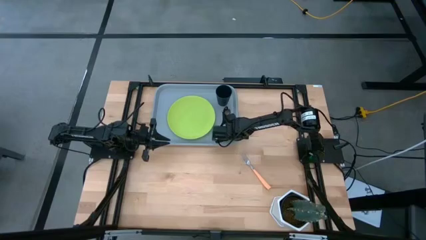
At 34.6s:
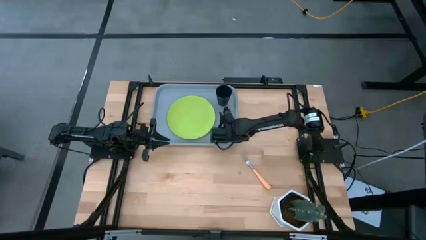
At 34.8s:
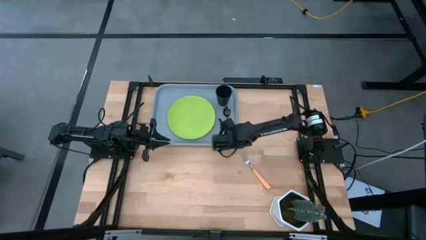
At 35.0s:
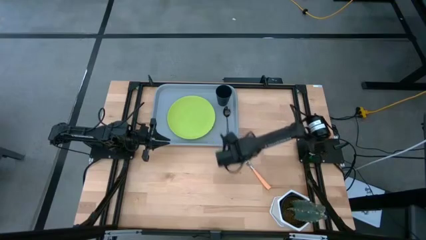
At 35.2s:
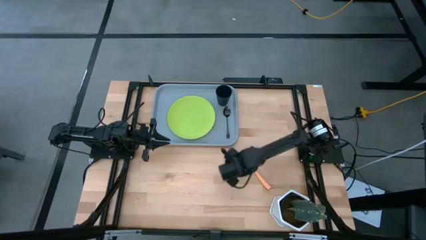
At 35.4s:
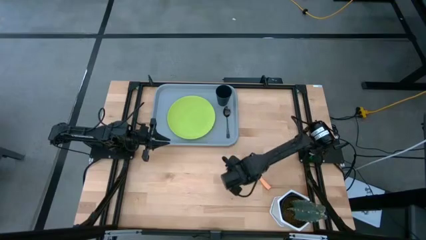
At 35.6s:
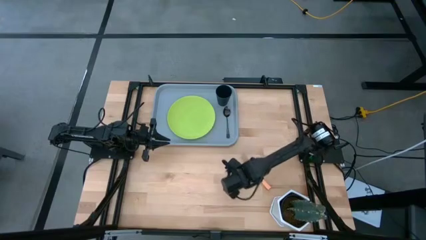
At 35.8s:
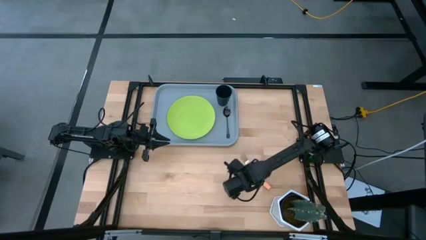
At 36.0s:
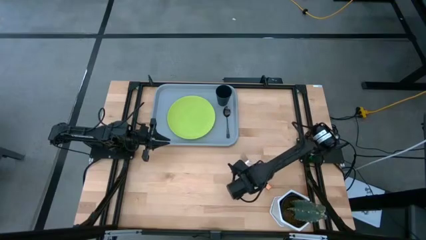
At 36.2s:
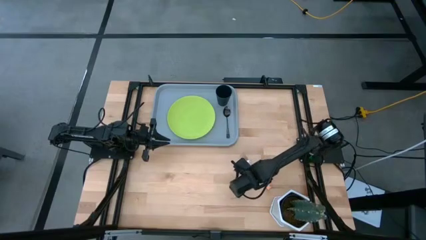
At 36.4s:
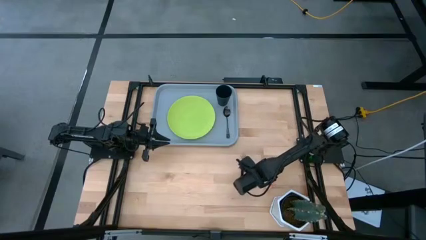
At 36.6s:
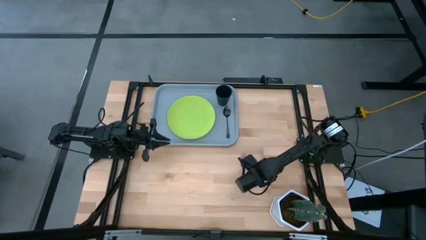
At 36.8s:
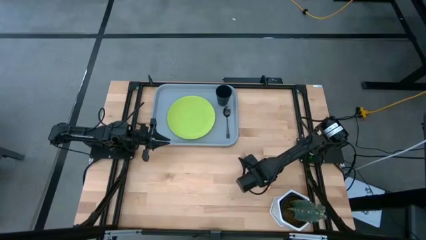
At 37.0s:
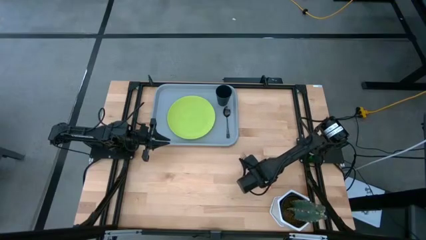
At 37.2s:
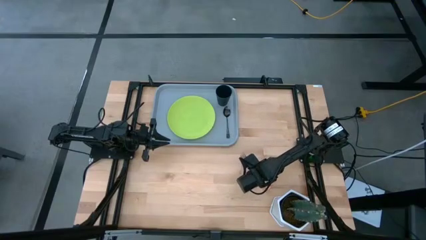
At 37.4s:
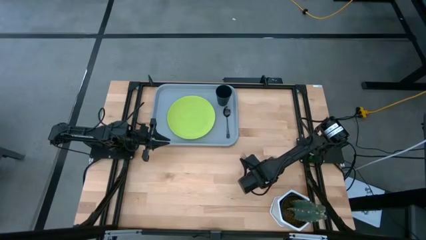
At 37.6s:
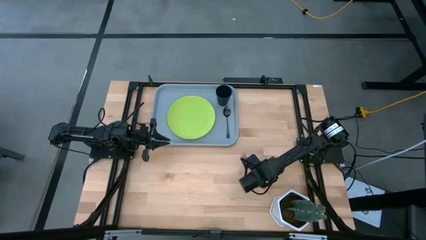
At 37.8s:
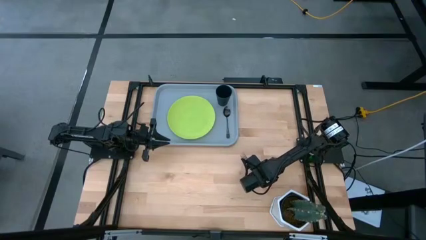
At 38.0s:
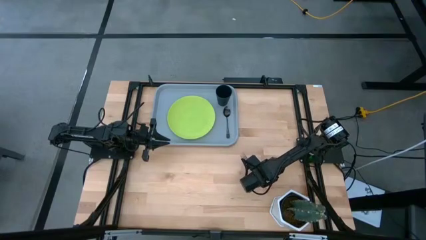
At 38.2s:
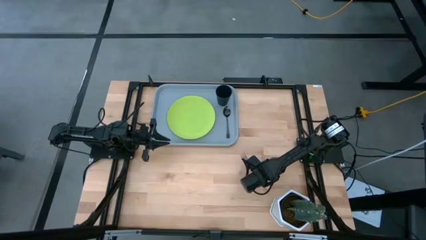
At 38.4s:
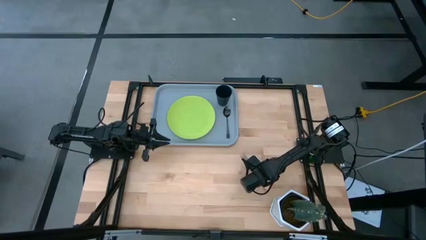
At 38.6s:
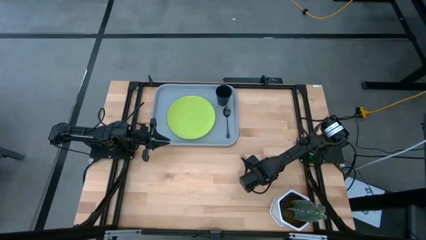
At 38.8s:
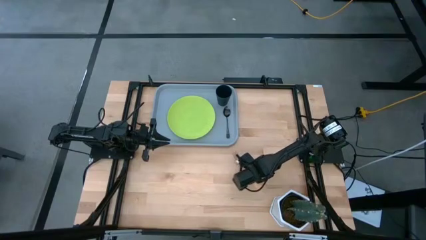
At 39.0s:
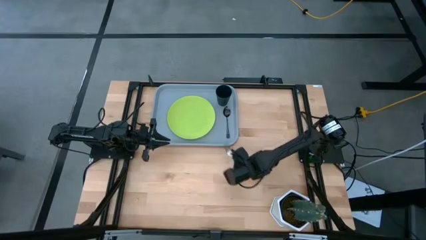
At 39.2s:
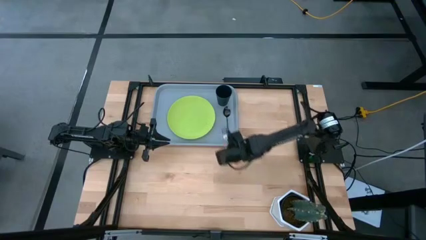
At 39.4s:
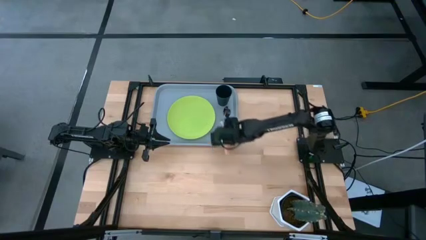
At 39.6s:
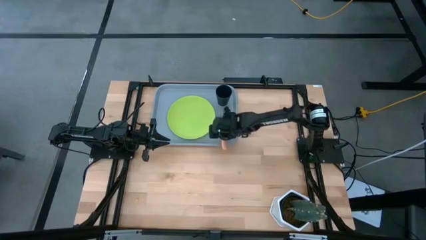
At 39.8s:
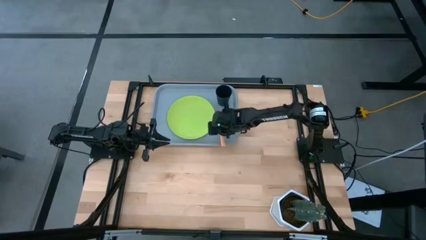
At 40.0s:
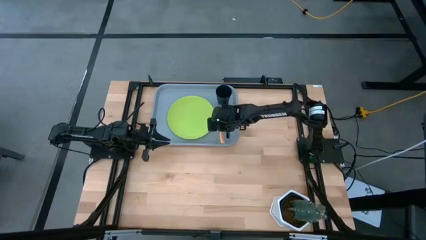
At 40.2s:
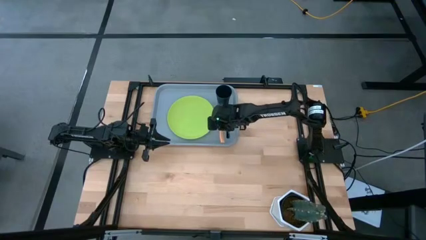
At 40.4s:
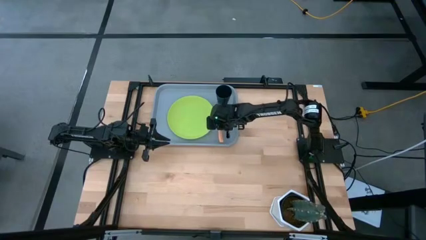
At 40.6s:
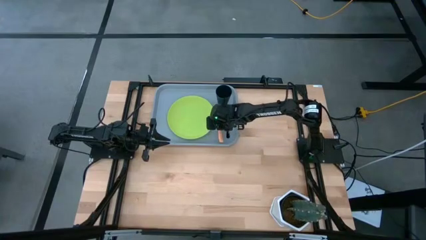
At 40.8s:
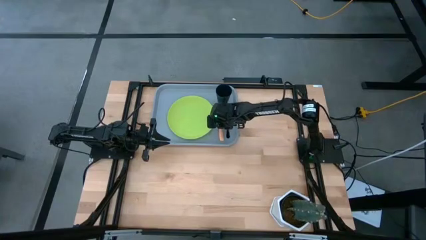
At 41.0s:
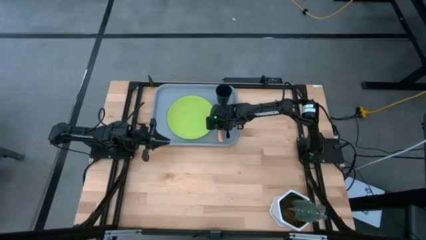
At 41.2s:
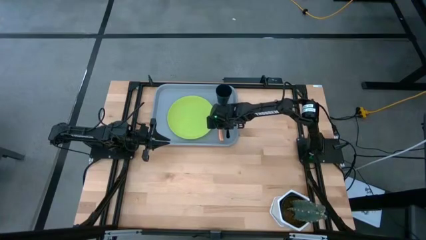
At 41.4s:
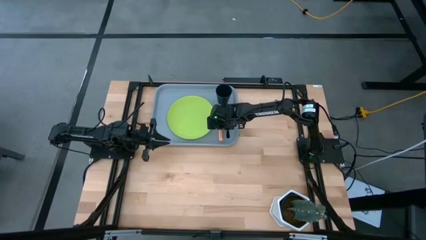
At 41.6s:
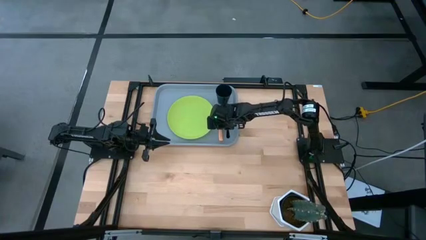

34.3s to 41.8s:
Task: Pick and place plate/cup/fork/spoon on tray
Put the orange fork on the gray tray to the left of the black spoon

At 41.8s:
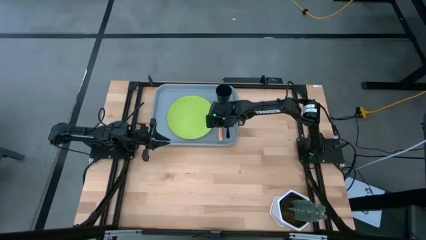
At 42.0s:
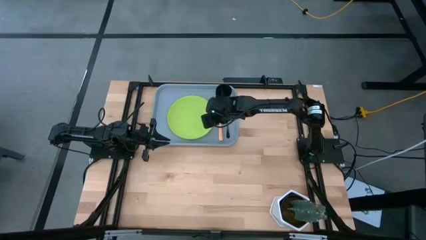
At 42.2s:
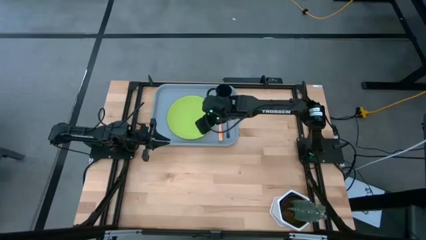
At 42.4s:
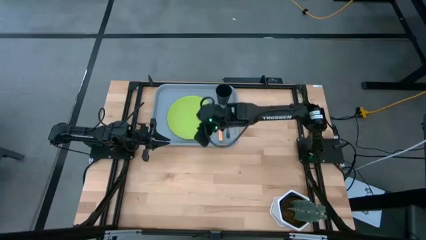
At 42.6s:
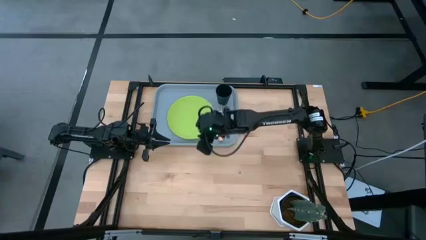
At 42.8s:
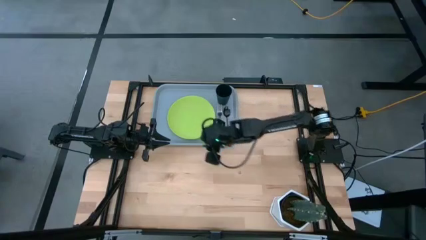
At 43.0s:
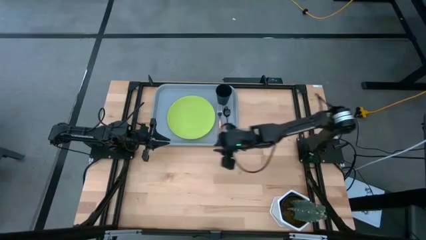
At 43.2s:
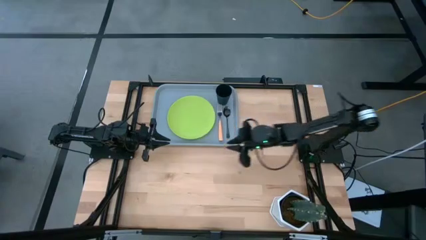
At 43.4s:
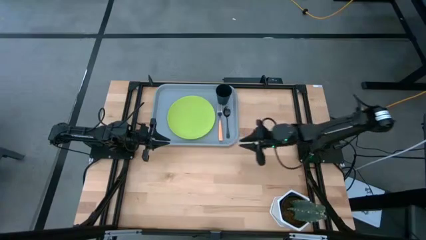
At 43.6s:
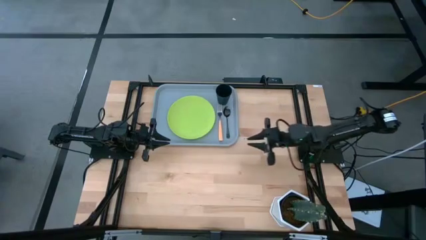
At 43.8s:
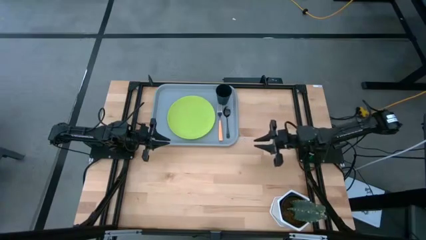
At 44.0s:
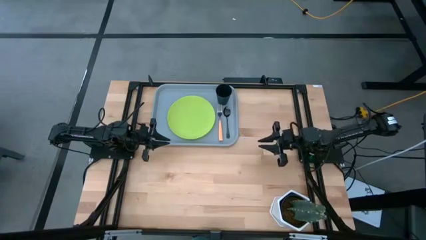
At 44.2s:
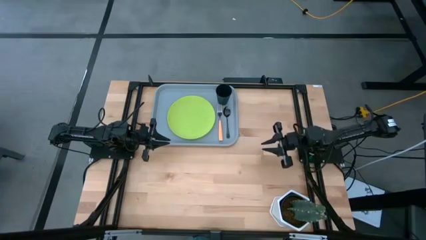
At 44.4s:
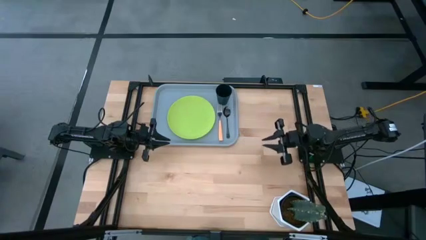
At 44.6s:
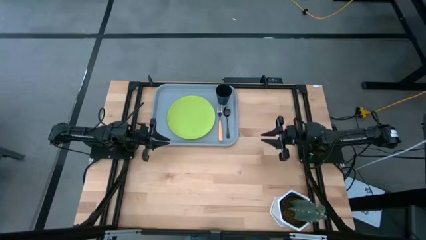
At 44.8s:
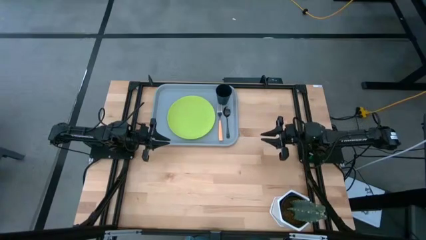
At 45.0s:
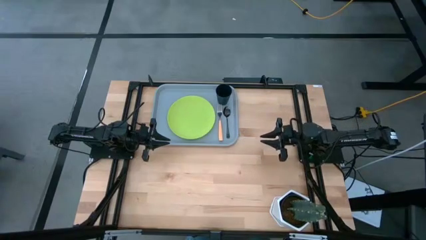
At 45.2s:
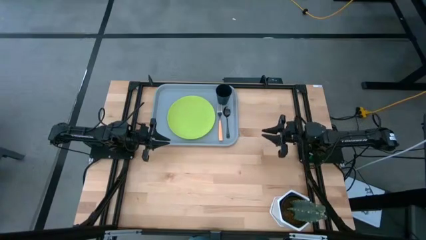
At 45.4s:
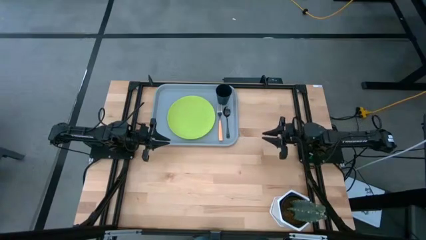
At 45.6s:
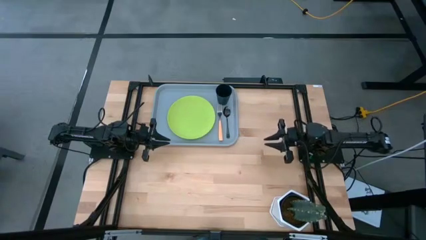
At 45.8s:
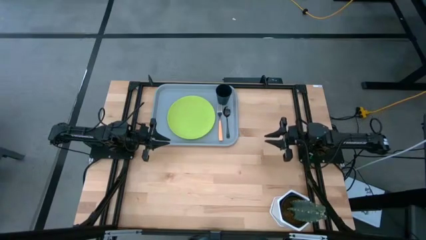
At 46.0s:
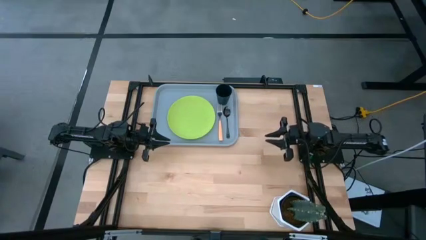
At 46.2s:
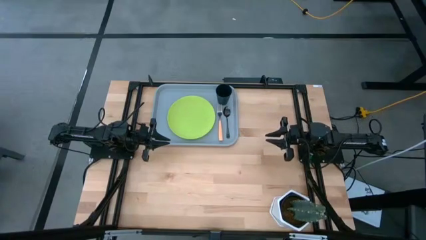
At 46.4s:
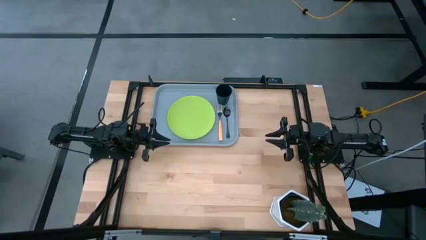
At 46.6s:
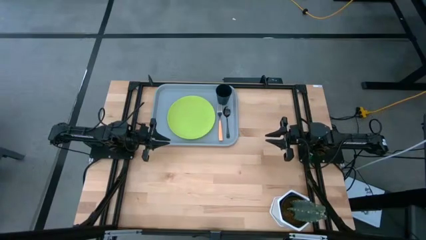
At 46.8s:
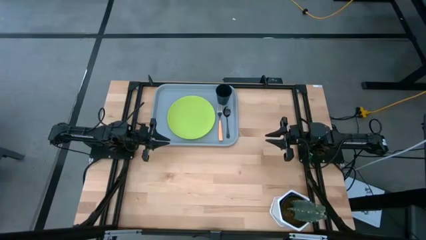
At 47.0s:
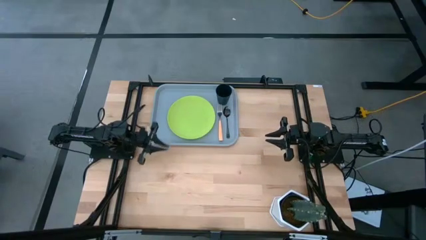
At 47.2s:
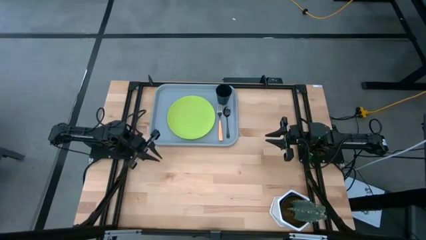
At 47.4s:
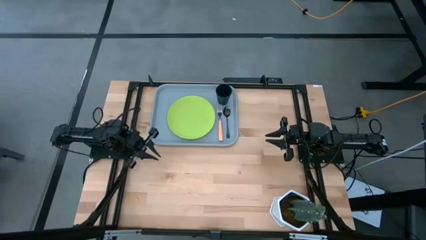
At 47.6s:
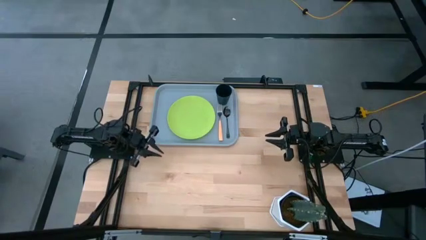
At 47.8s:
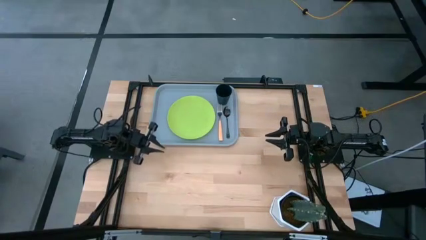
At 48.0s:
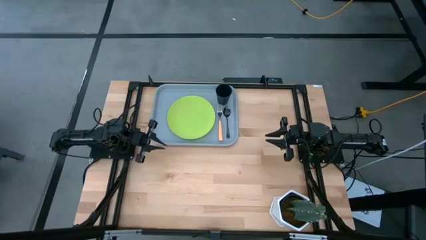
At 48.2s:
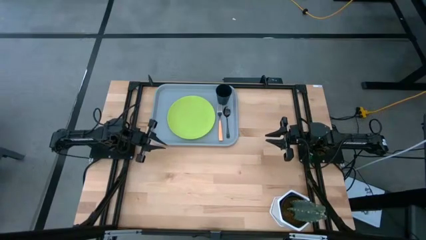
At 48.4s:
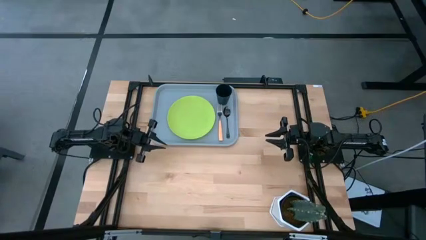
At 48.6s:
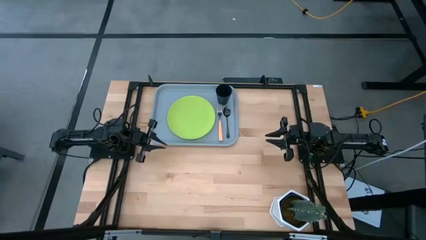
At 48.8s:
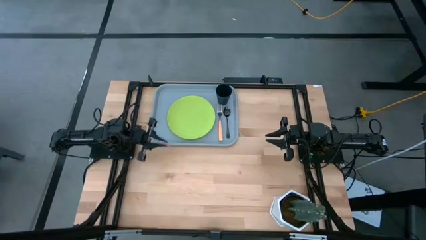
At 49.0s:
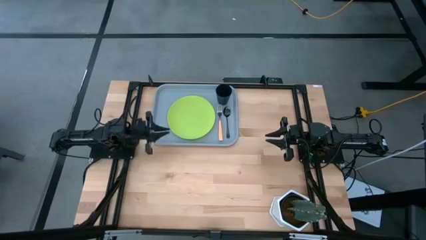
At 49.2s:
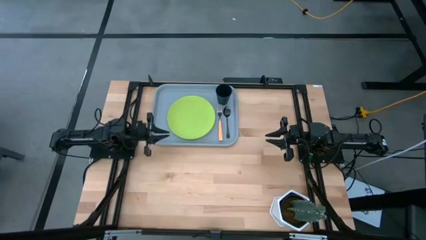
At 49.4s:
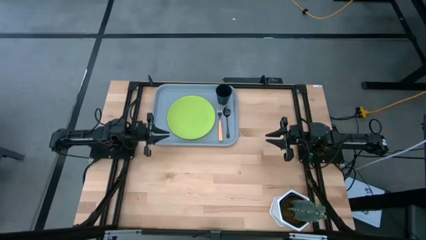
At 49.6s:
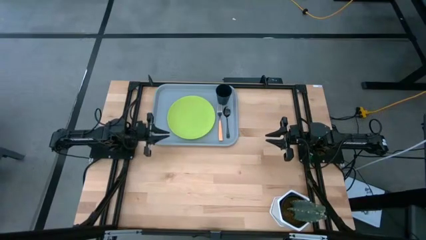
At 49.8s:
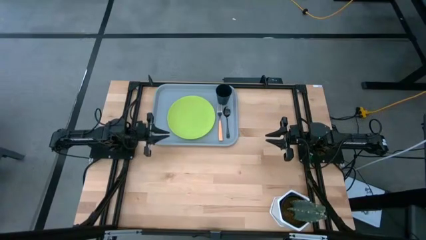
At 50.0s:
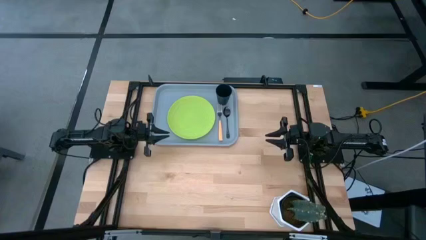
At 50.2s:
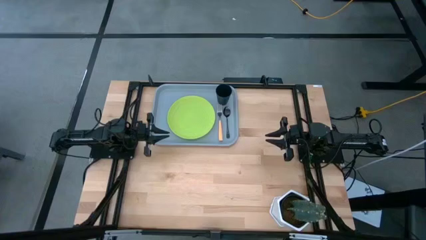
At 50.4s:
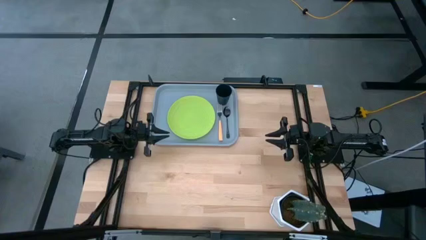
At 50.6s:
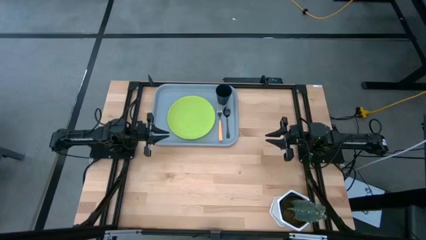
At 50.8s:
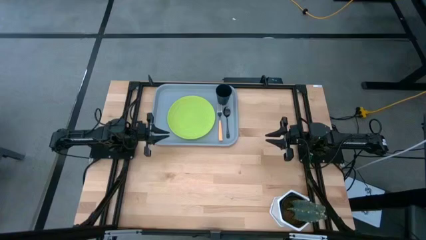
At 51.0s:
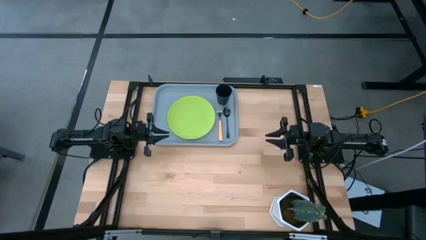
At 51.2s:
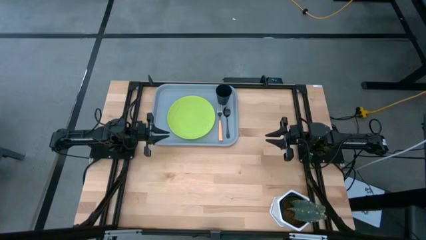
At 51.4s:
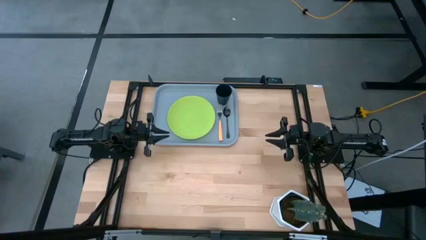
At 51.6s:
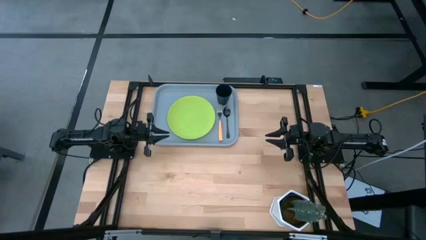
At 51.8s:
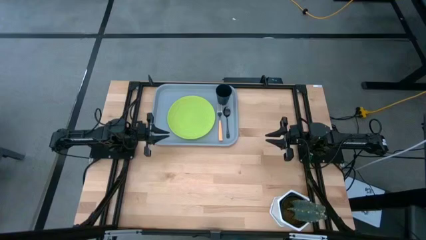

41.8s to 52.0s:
Return to Home Position
